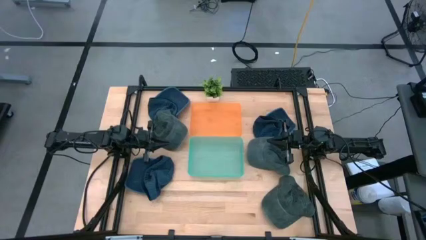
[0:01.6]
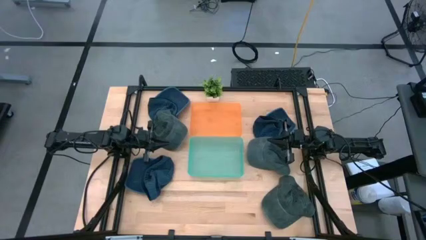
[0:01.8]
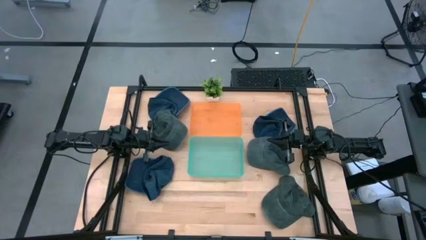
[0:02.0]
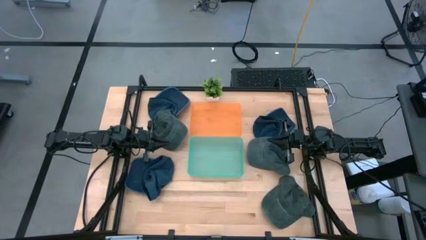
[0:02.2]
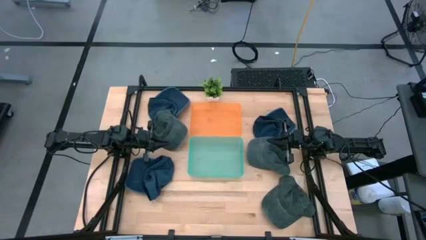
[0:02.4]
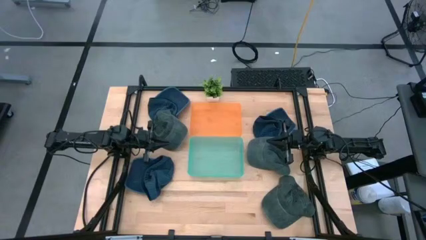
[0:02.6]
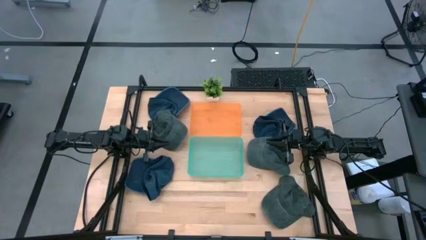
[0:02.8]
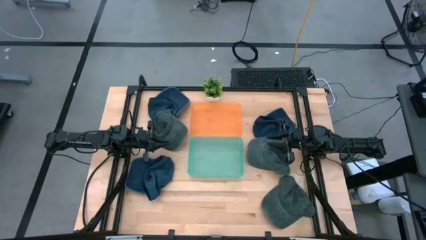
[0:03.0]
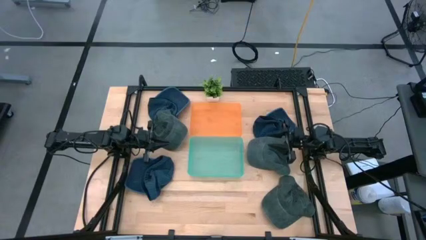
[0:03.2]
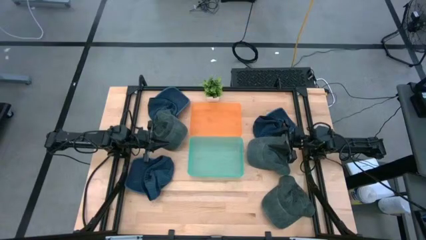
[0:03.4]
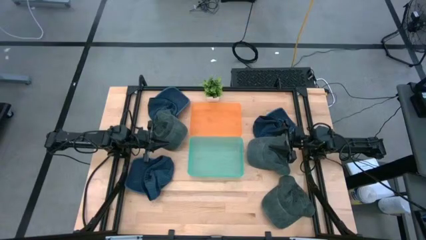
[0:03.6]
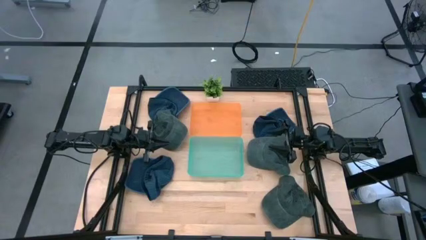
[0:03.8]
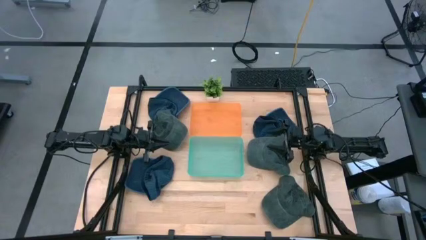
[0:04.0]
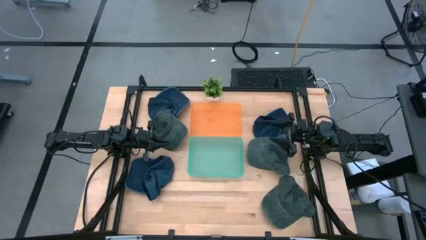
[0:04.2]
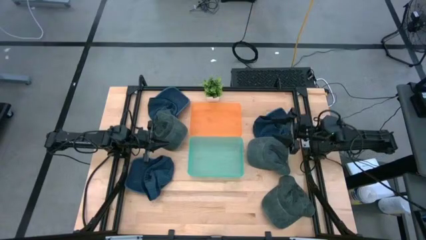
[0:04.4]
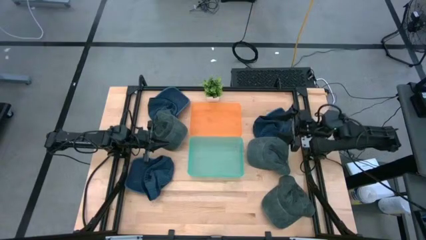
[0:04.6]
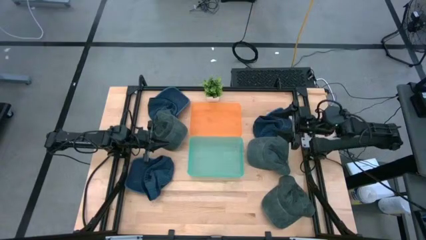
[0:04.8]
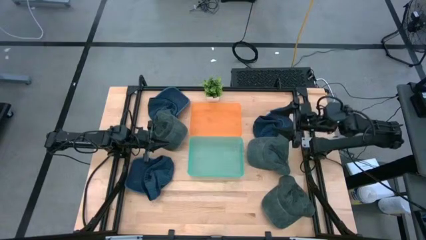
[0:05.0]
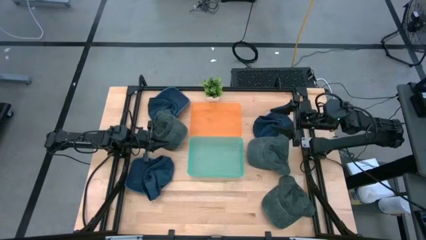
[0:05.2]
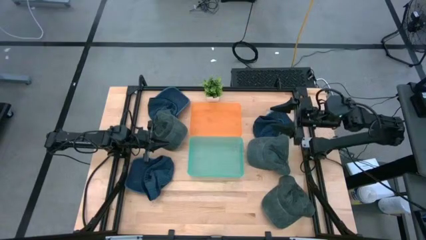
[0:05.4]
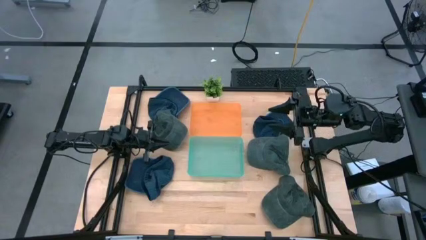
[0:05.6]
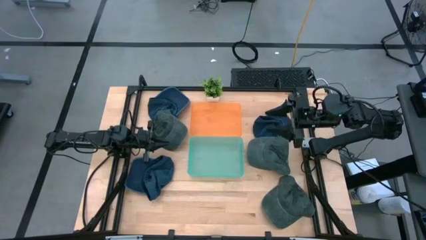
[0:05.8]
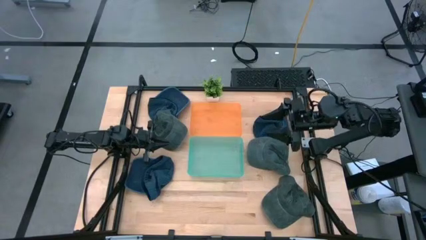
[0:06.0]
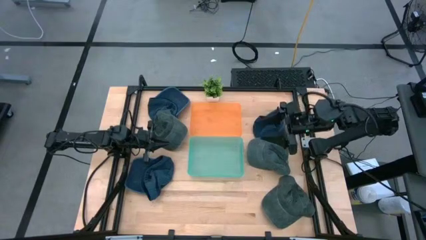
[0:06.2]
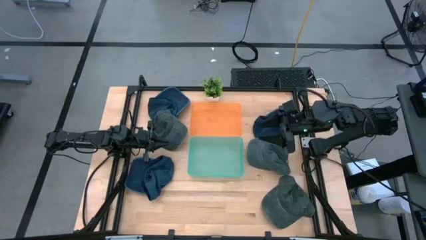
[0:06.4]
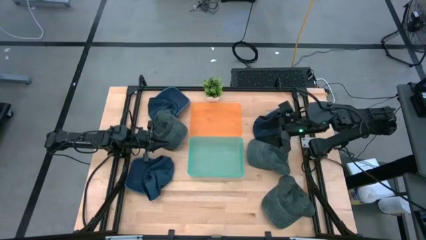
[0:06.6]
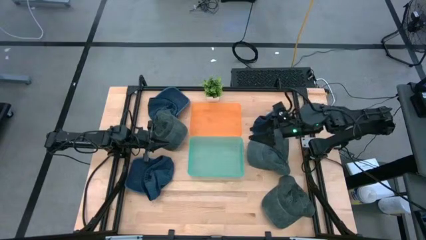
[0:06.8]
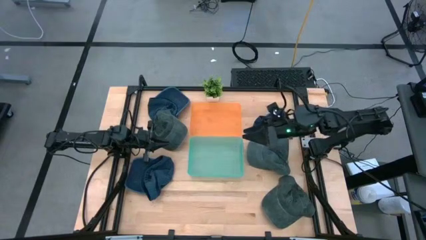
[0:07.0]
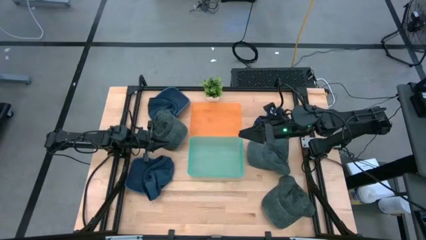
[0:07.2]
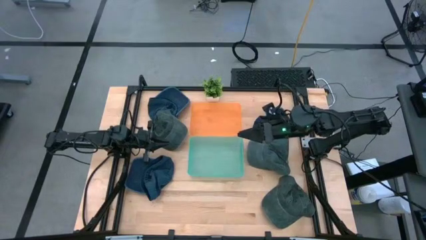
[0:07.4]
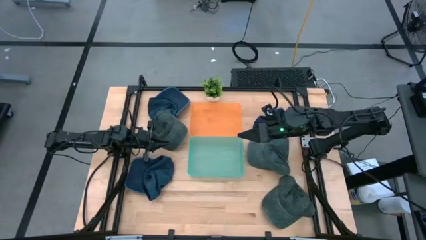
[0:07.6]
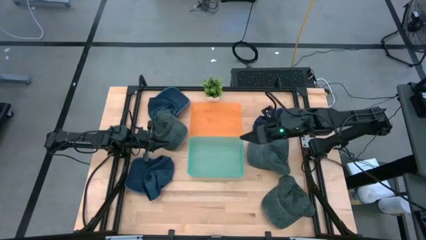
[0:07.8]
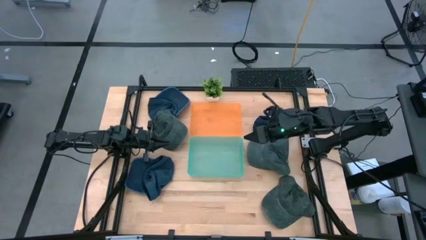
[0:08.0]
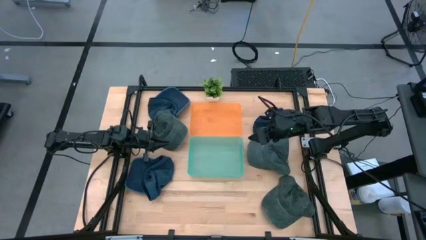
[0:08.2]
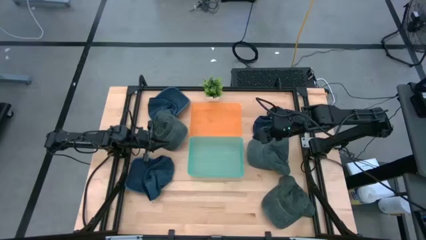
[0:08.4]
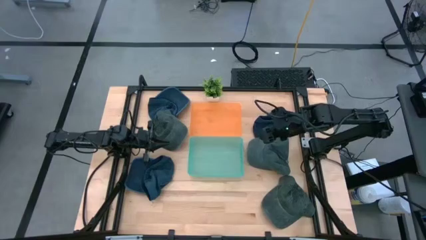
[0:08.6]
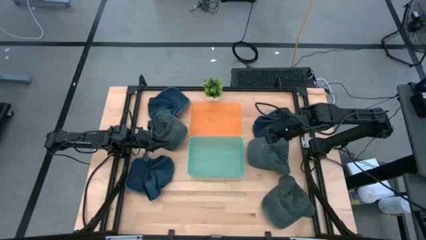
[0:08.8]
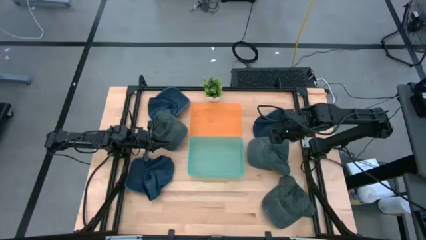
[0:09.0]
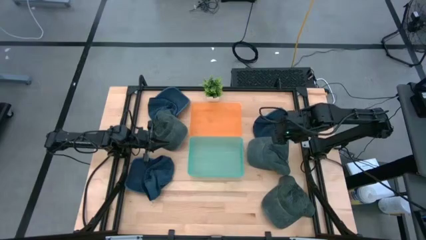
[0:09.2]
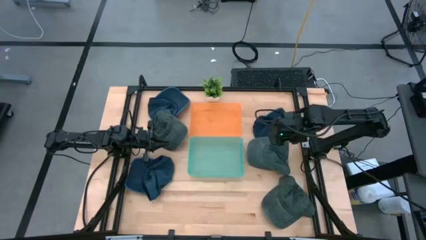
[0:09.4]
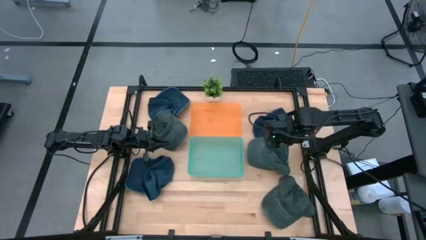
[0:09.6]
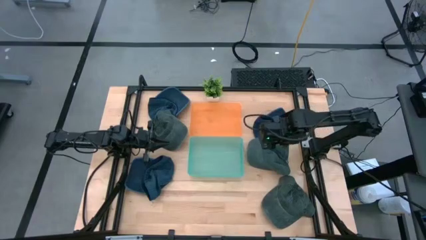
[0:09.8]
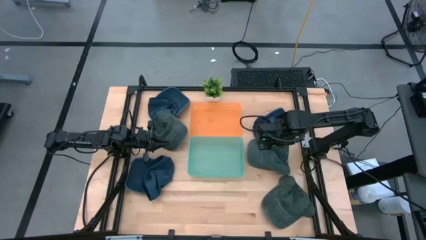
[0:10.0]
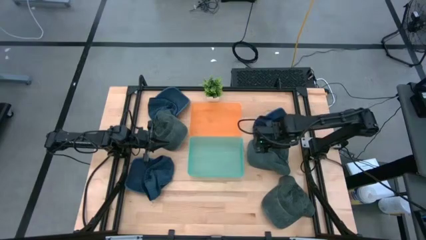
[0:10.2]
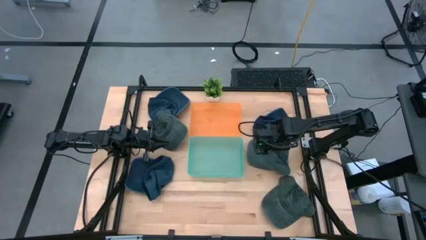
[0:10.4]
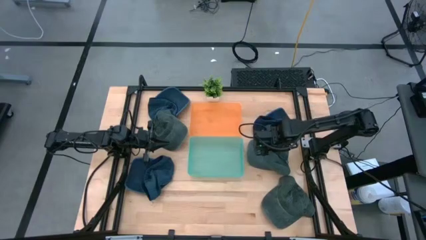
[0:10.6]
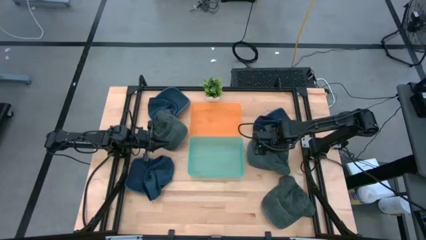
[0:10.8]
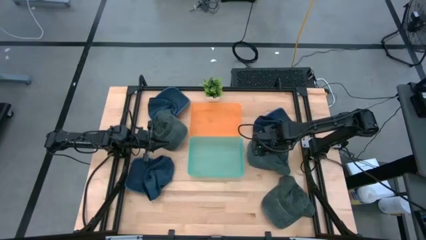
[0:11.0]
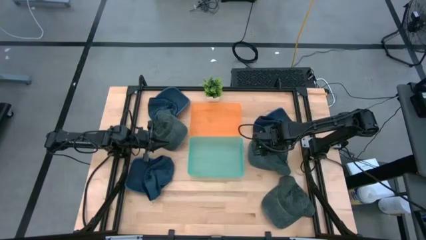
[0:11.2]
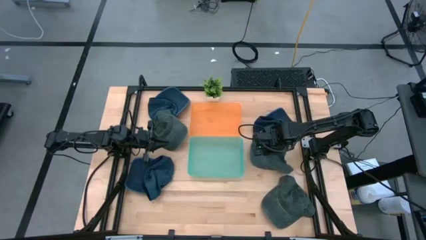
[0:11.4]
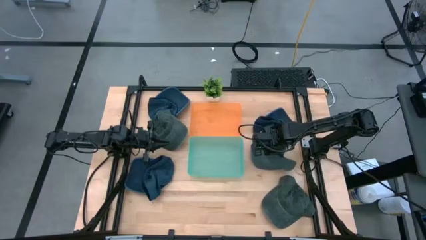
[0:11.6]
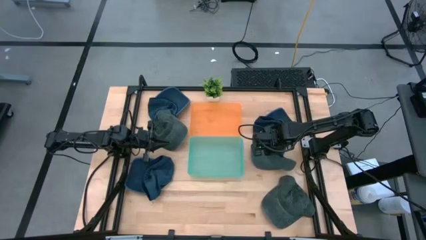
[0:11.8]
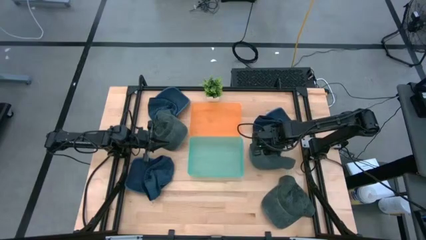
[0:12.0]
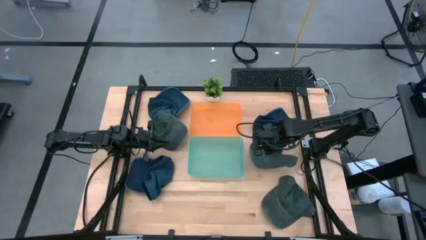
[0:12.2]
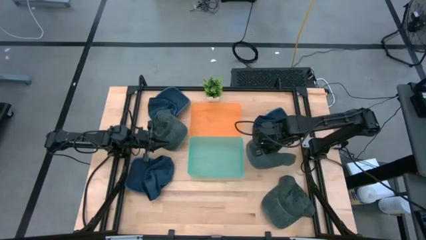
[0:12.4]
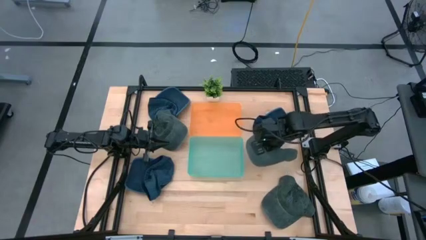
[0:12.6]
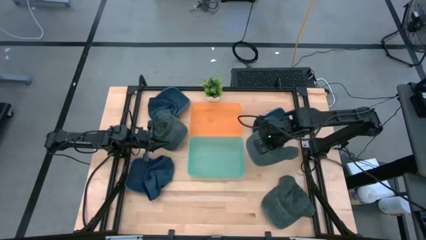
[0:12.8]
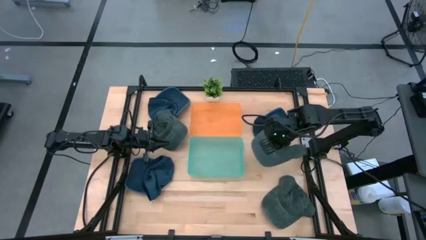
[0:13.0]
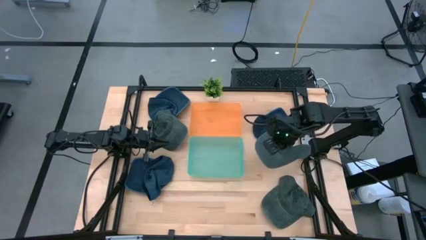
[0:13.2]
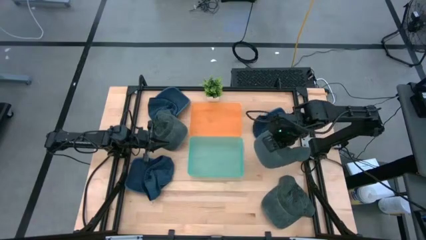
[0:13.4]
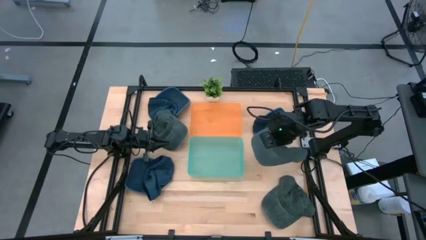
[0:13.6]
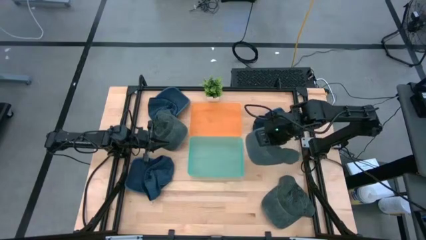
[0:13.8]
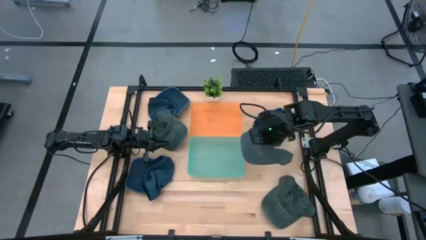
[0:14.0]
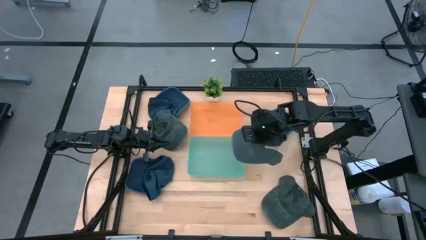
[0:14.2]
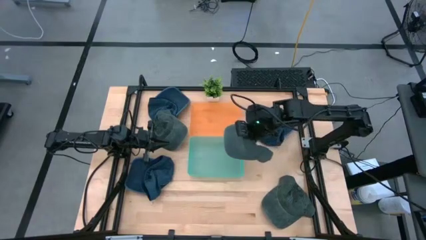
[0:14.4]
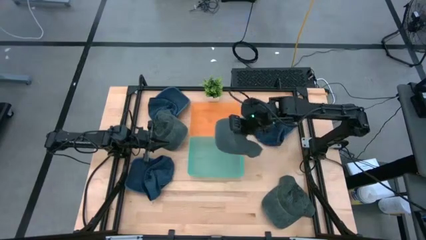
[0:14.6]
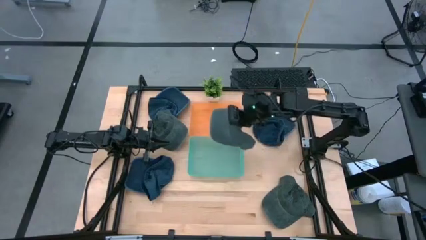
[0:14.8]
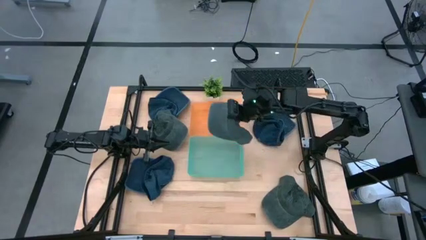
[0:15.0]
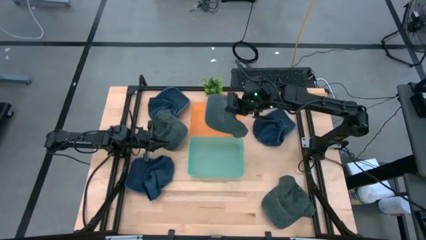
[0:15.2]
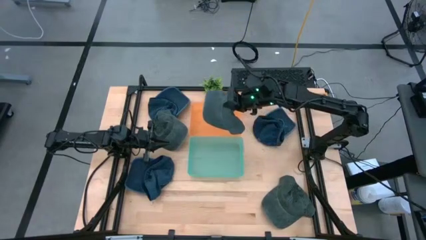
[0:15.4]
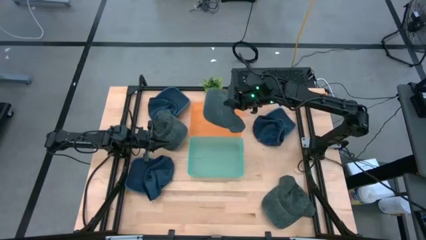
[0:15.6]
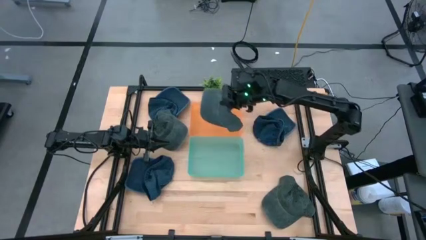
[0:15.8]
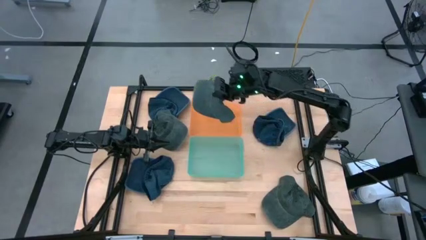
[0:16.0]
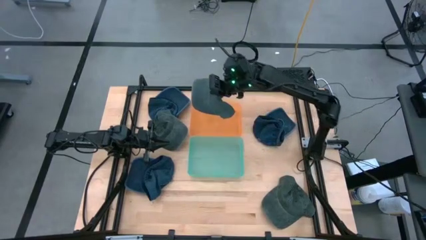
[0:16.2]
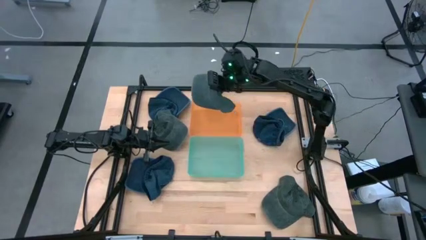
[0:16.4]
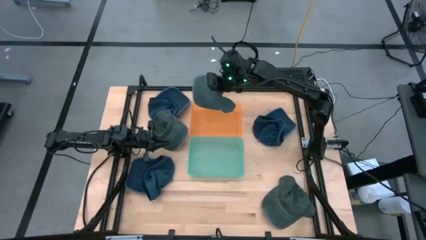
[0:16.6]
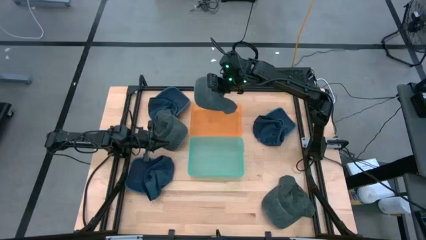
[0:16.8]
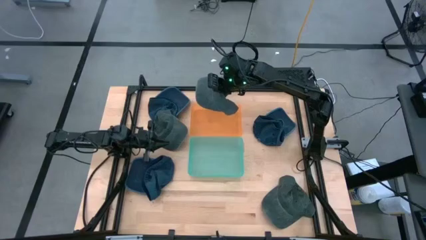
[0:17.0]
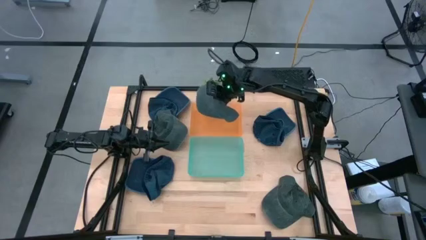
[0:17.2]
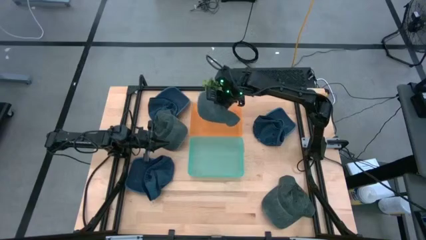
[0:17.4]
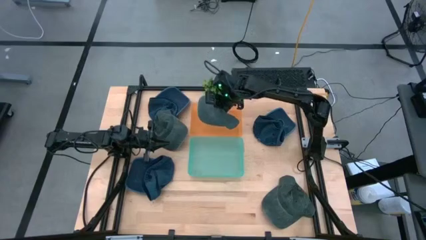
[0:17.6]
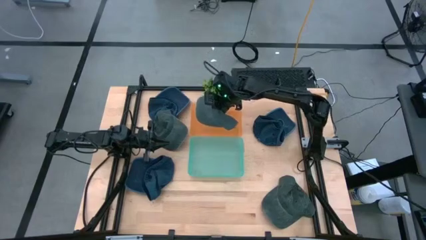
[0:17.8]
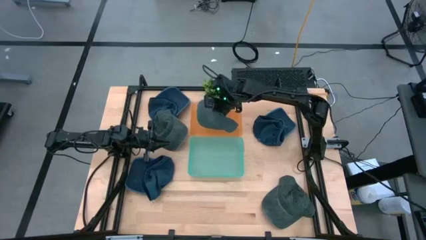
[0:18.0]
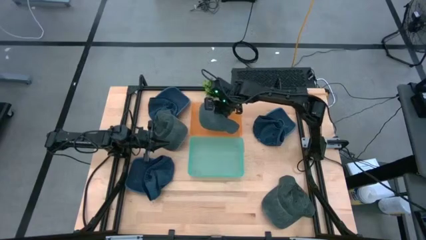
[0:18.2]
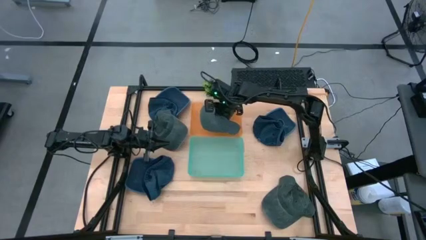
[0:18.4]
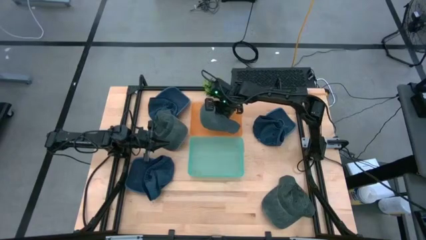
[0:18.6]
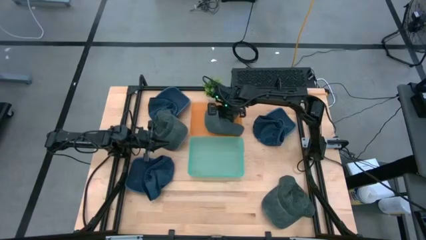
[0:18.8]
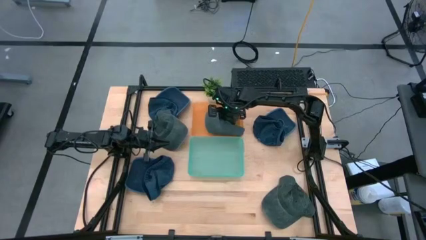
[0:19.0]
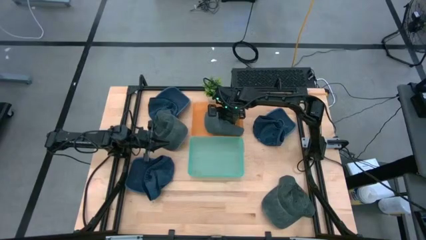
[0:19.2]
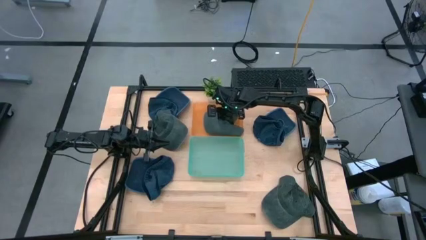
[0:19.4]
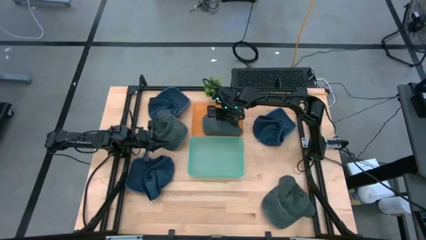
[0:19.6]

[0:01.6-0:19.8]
Task: Pick & Place hat
Put the top right gray cap into the orange bin
